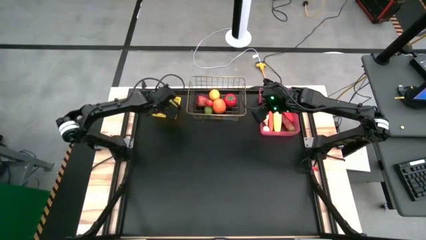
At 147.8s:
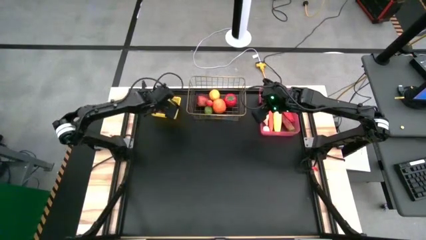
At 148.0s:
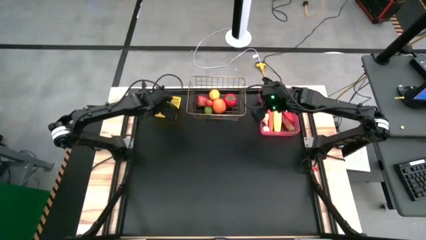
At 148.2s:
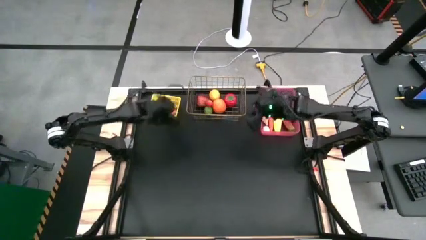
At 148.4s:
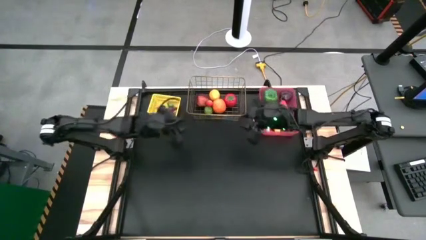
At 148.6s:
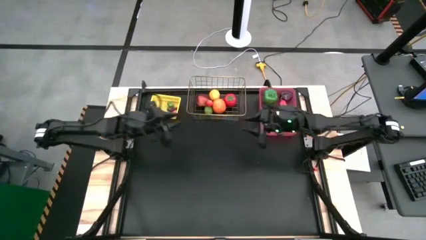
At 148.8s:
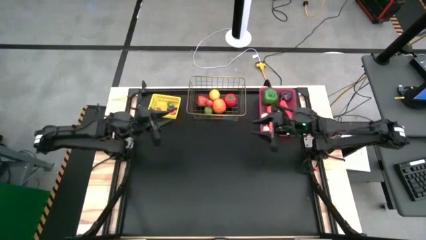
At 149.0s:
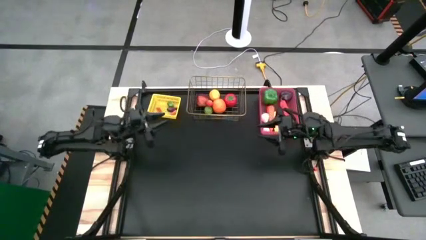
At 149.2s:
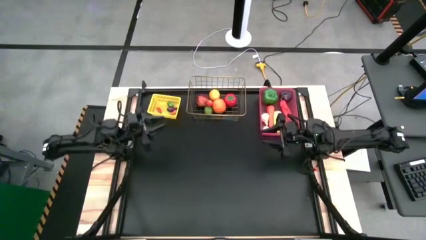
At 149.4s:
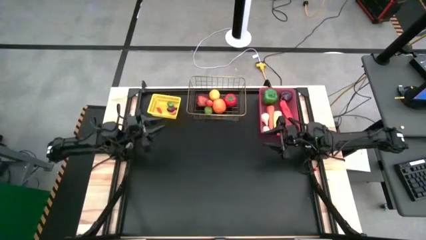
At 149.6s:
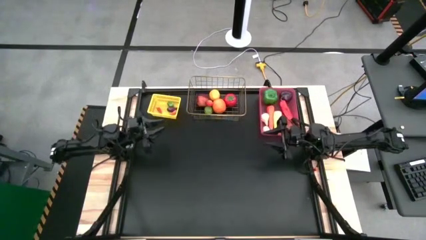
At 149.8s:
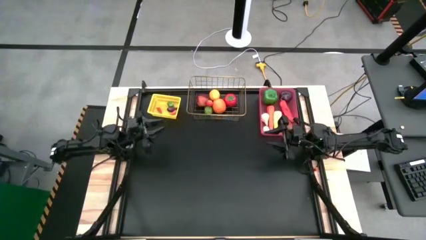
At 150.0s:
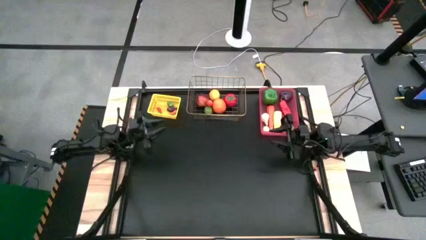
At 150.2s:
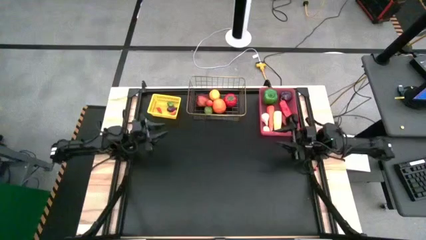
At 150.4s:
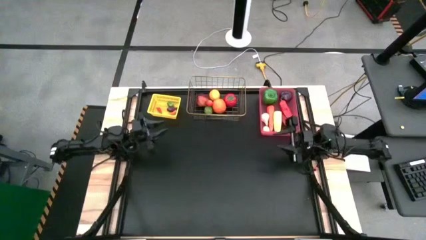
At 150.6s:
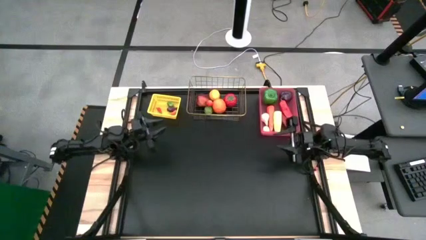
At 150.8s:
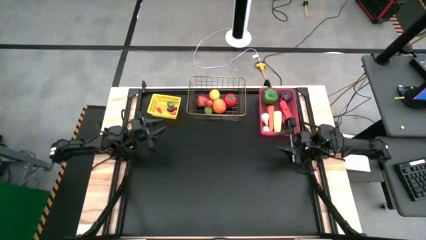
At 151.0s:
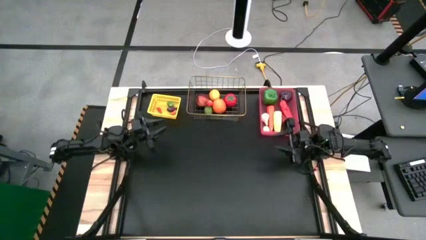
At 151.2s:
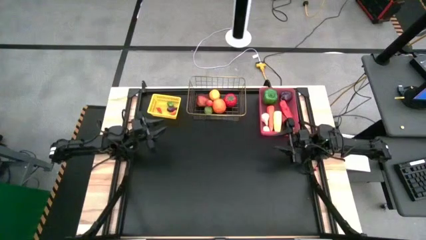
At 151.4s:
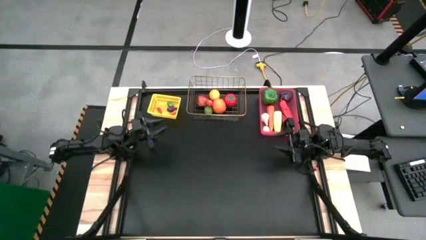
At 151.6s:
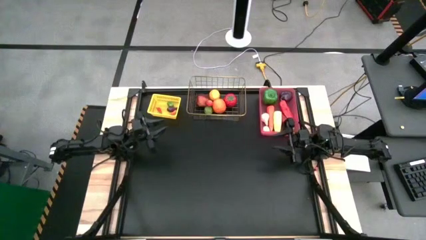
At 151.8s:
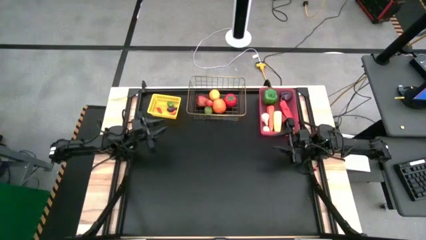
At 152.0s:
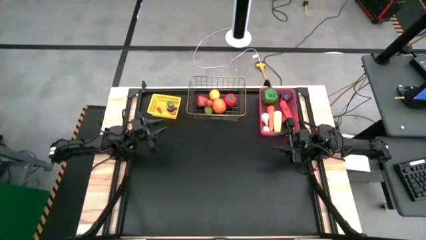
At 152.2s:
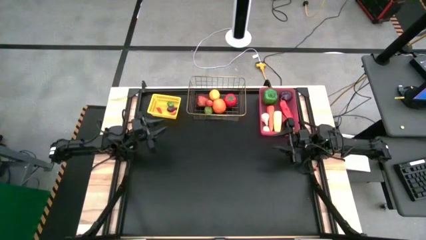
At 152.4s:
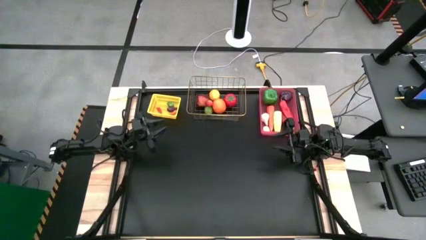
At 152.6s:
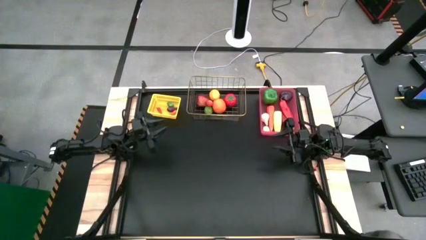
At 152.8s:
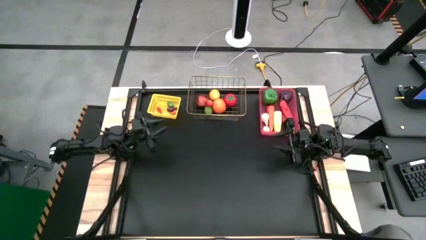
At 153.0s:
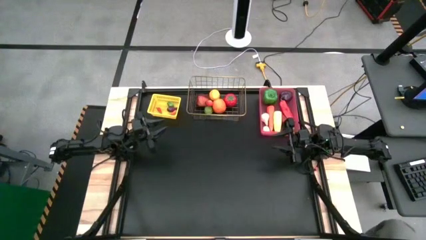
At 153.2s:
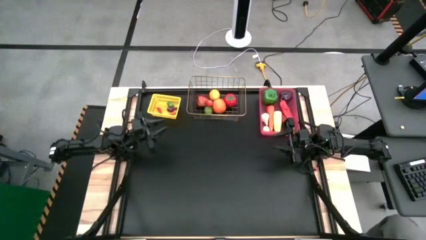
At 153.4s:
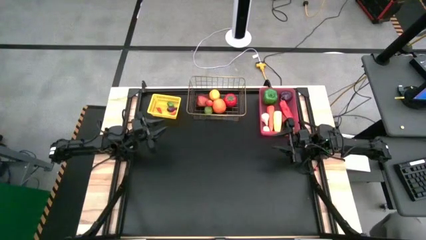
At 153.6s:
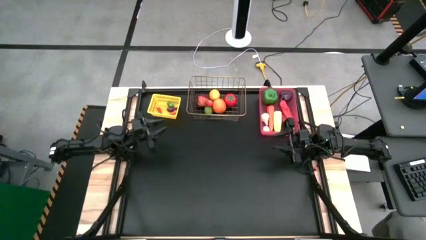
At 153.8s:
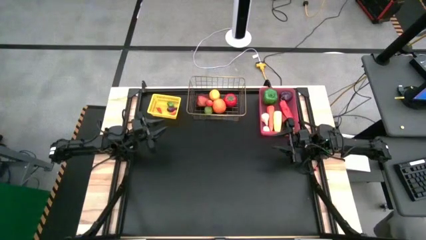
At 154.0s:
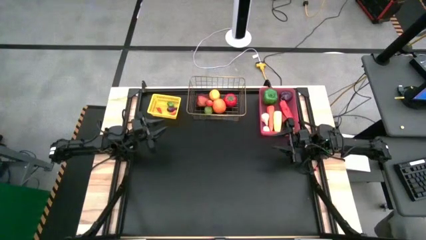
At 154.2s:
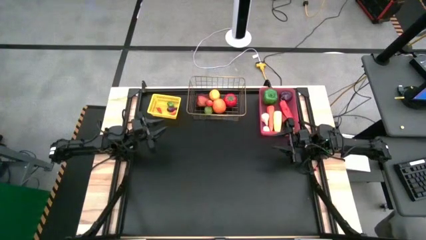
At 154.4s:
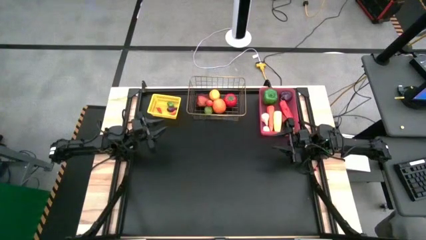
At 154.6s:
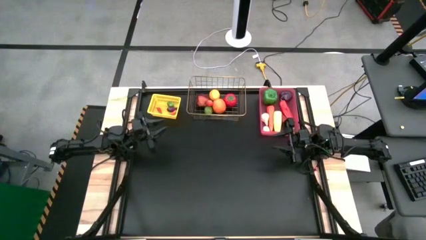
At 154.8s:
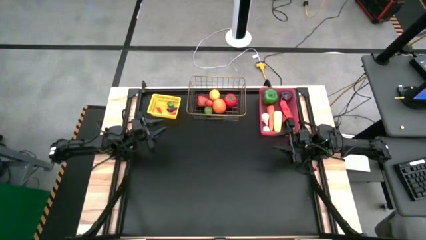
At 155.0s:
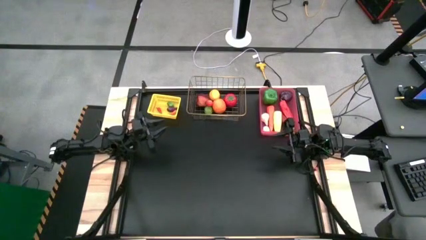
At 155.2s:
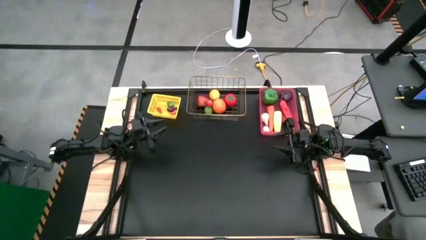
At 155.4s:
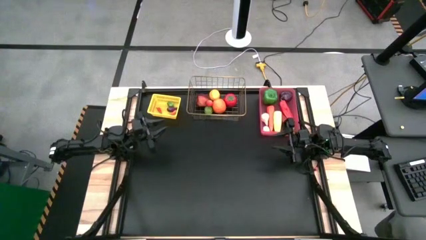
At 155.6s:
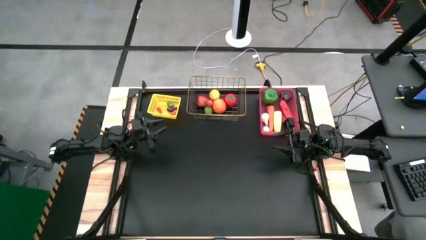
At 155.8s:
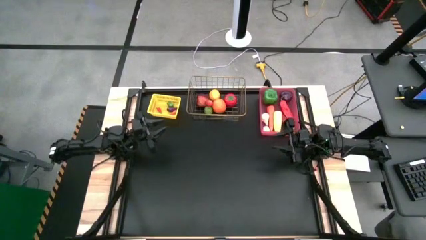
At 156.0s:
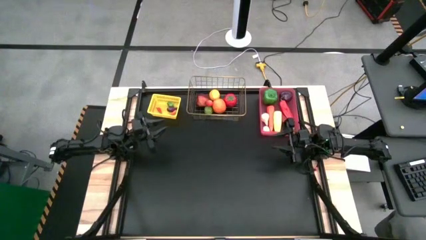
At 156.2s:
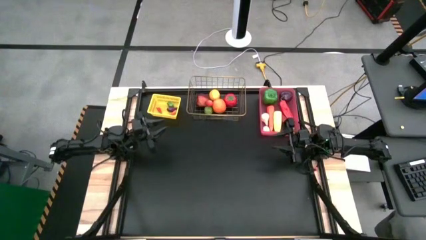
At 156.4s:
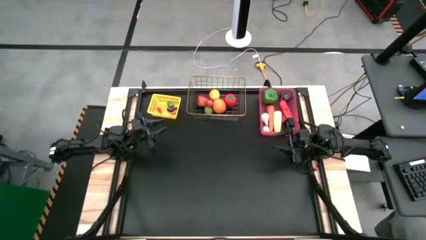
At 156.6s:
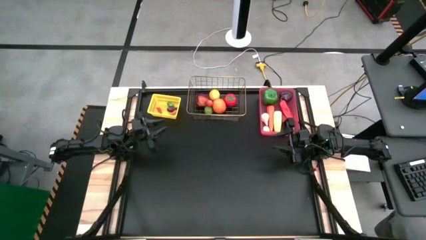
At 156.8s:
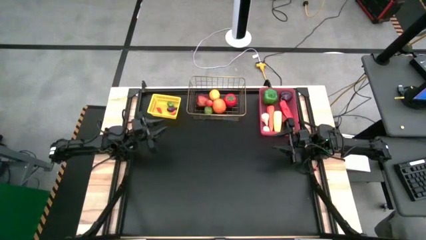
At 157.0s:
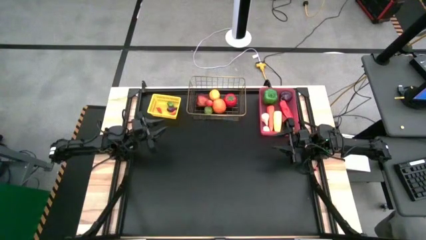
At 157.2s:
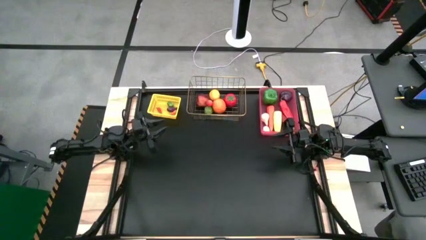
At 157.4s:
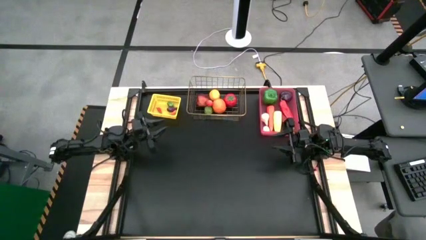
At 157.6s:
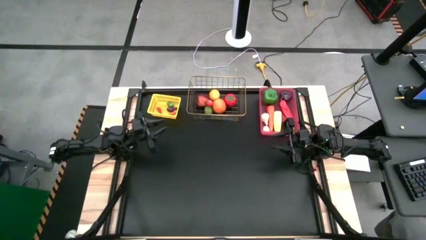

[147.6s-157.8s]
Task: Sort produce into baskets
Return to Home Position

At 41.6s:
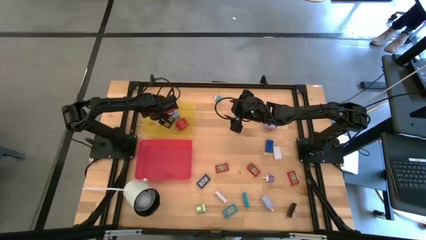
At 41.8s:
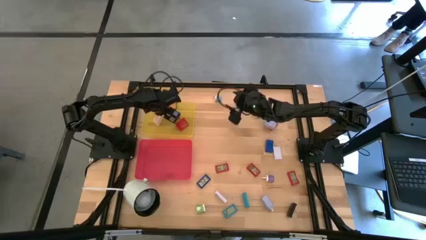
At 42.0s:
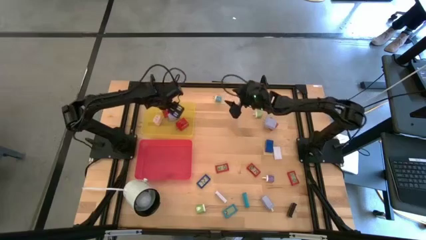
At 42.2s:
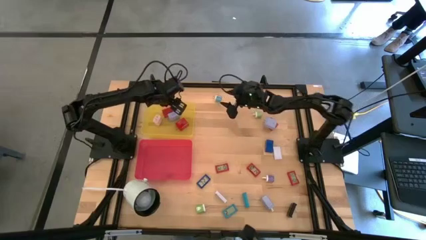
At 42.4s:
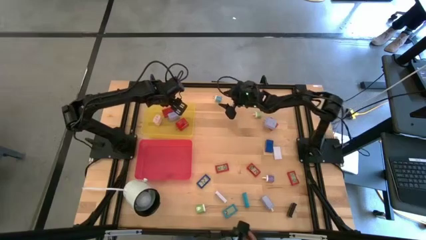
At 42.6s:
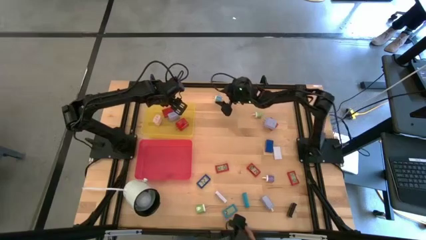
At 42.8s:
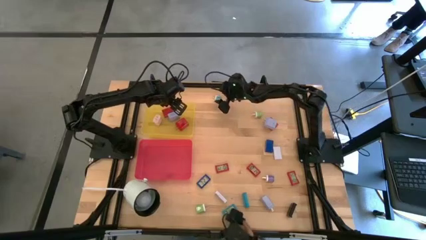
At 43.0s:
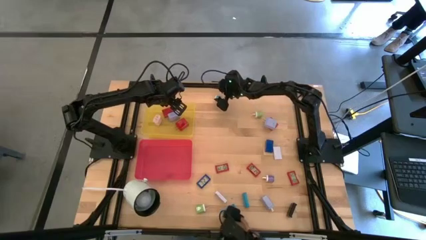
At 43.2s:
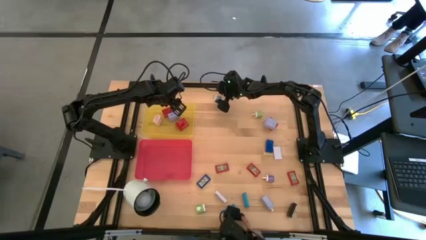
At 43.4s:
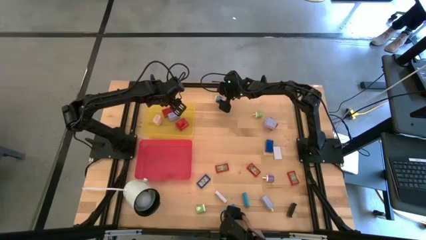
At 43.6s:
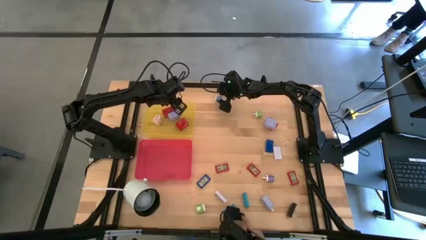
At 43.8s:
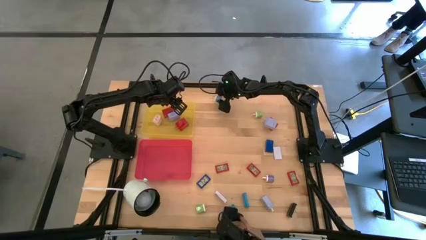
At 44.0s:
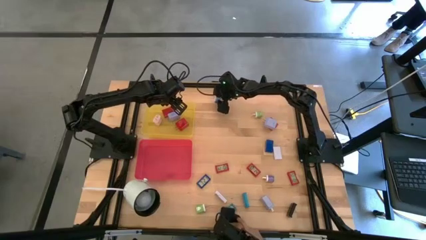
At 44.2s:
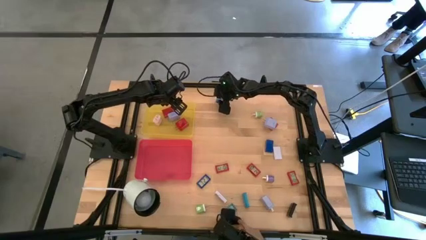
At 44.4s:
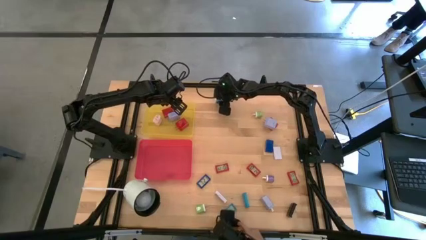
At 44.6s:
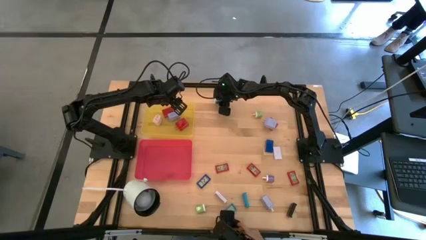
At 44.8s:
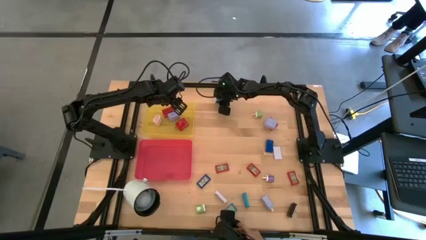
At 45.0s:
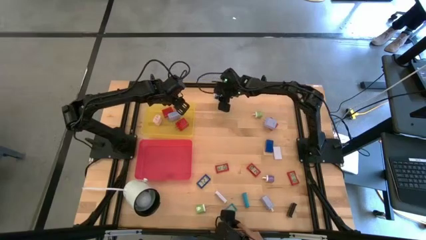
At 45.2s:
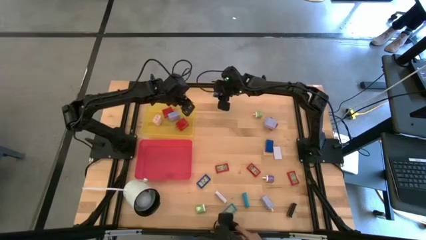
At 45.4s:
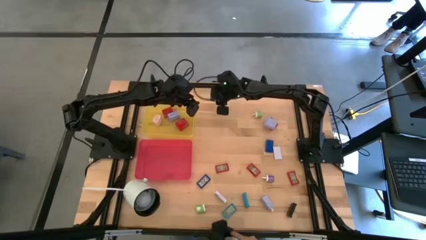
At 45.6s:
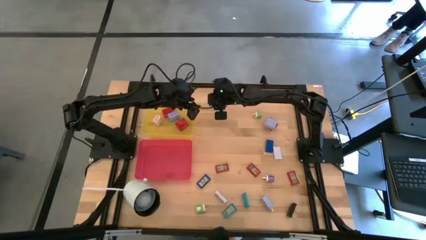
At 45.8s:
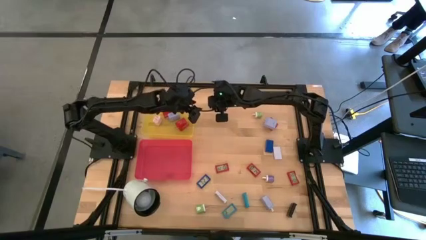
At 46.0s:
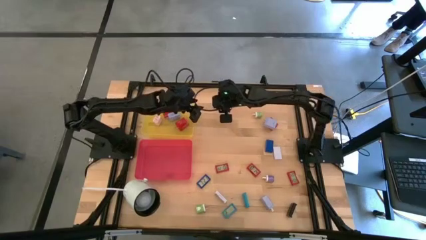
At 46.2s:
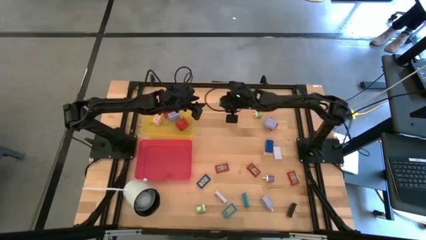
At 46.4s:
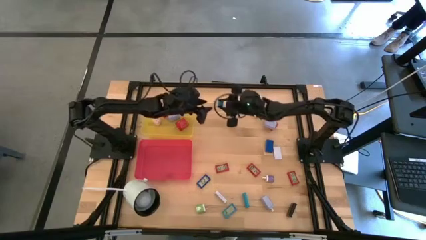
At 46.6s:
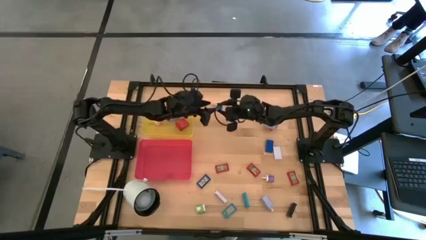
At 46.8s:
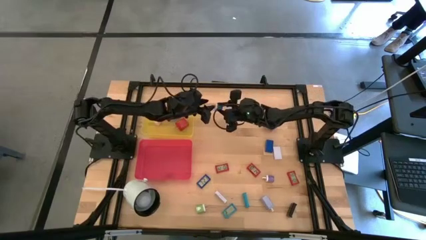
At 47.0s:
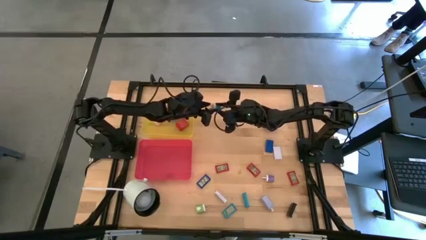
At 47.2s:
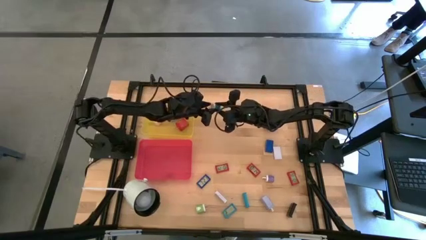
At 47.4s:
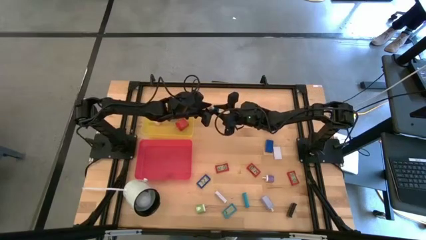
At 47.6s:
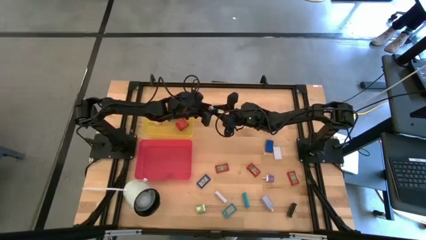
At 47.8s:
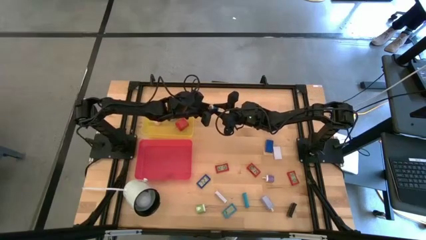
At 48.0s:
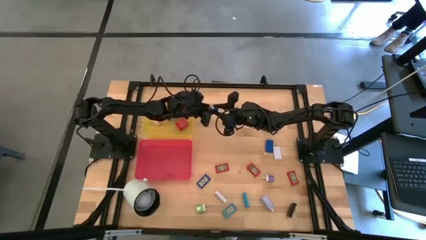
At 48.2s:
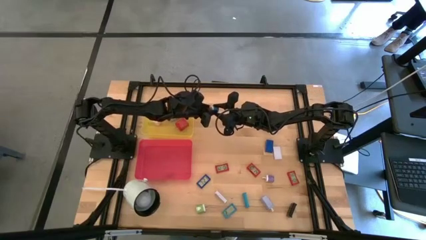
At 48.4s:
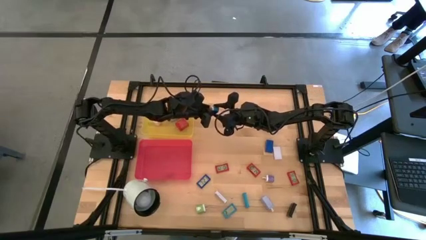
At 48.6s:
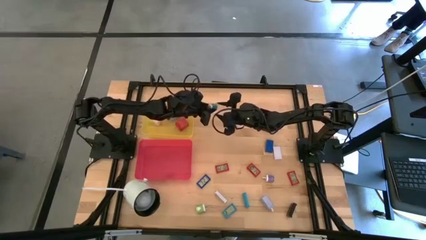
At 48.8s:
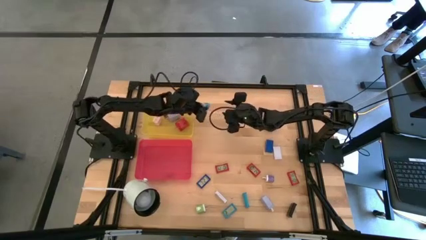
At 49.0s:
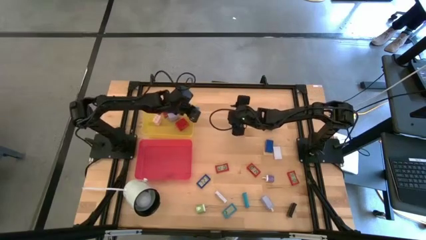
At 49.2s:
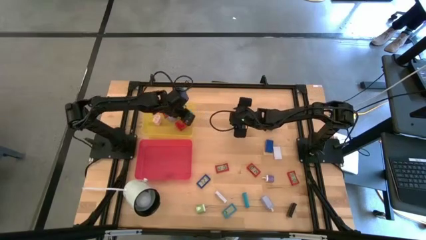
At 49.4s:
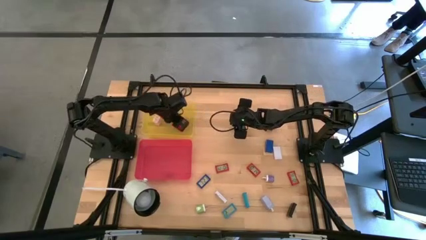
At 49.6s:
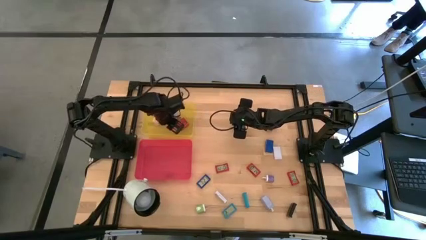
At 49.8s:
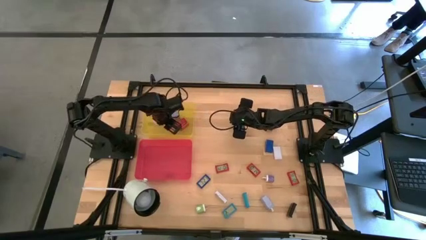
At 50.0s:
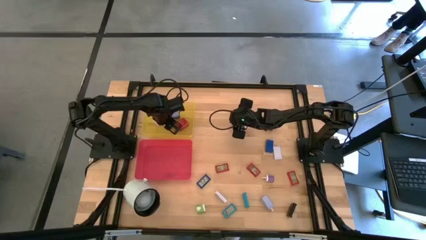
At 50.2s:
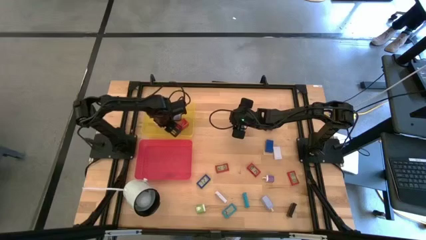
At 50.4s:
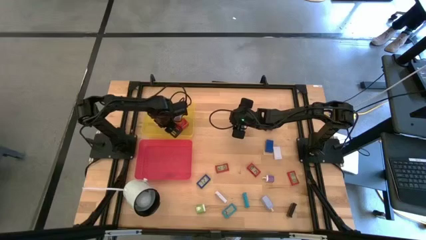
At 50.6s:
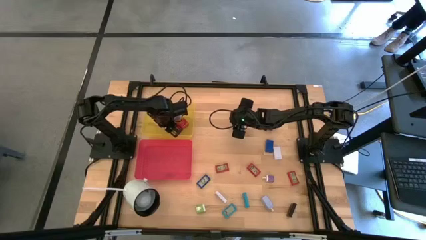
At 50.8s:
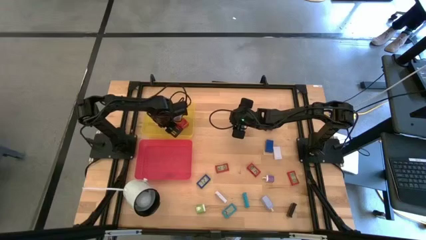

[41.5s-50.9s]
Task: Pick & Place Office items
Put the light blue charger adapter into the yellow bin
